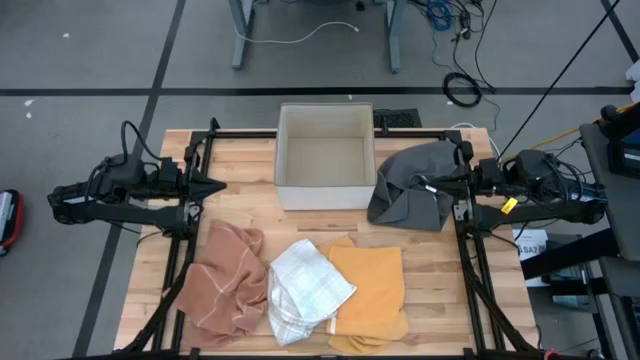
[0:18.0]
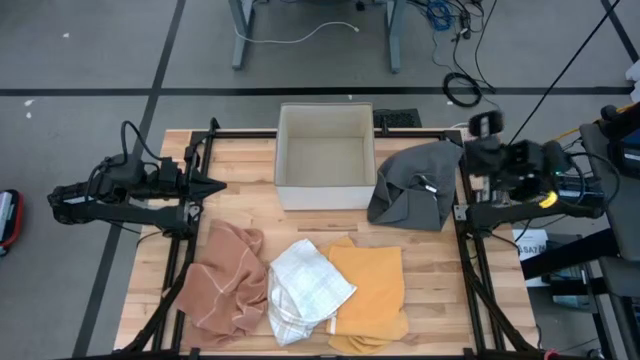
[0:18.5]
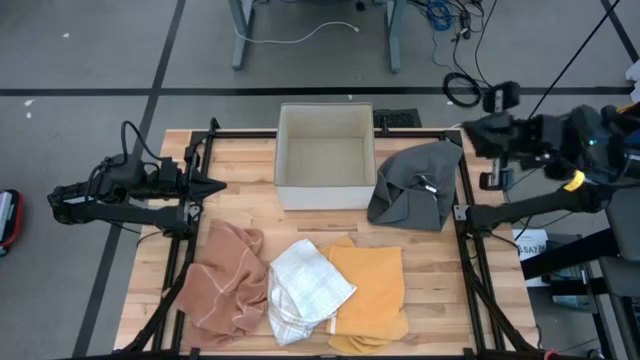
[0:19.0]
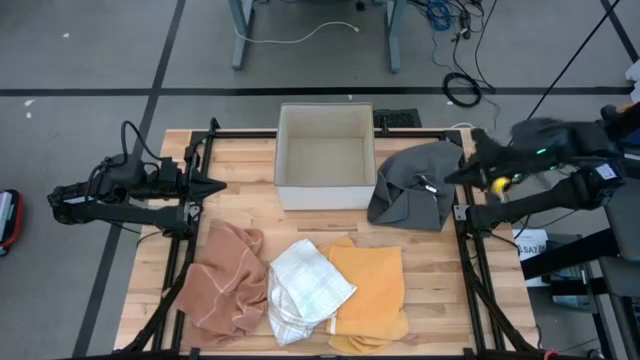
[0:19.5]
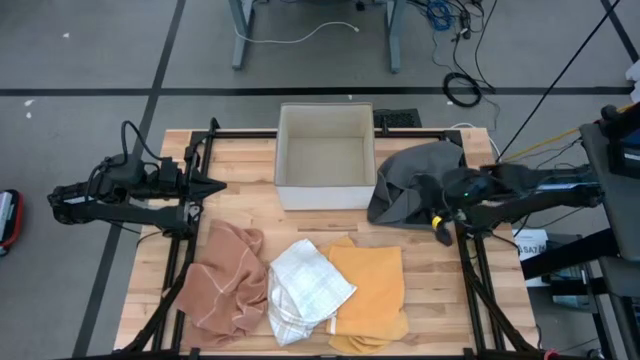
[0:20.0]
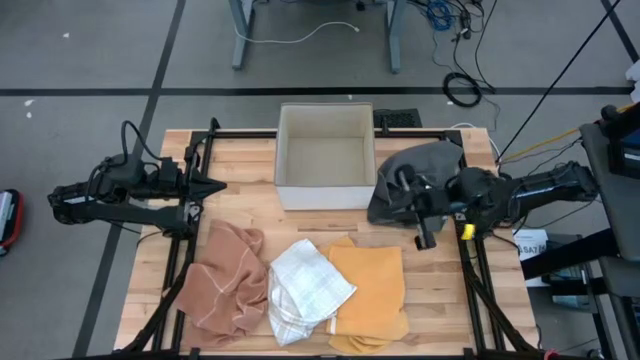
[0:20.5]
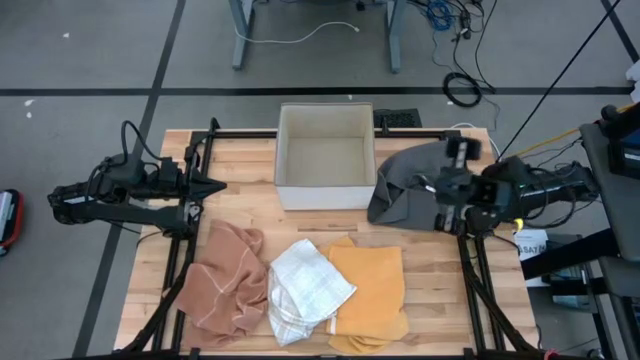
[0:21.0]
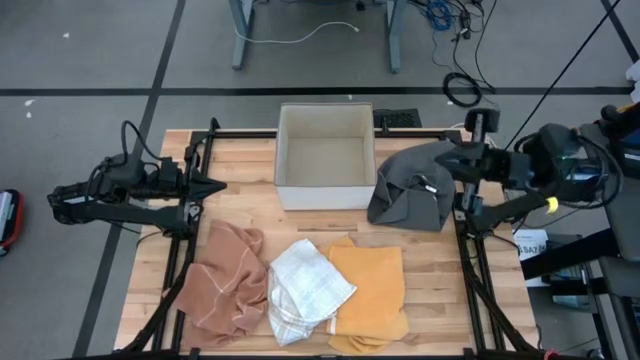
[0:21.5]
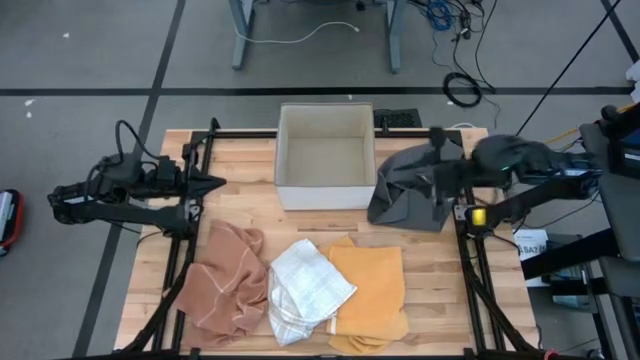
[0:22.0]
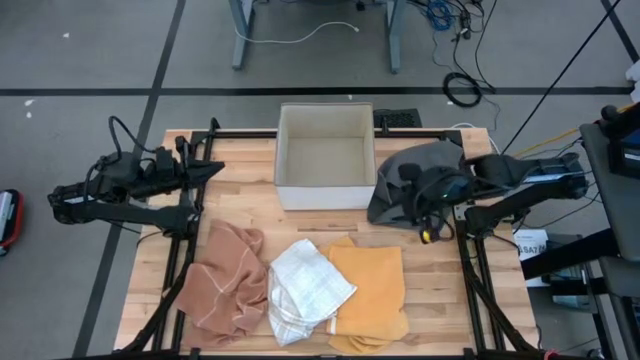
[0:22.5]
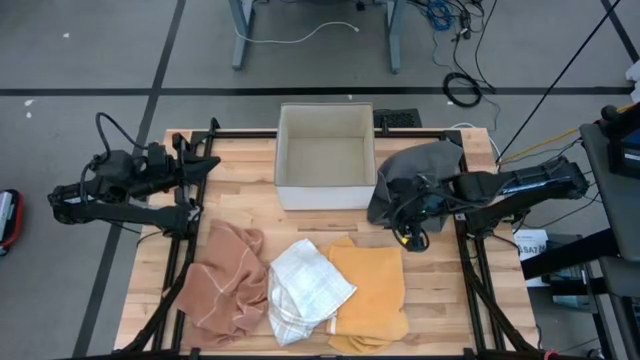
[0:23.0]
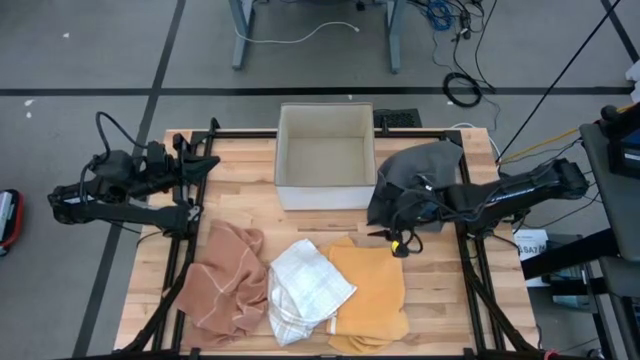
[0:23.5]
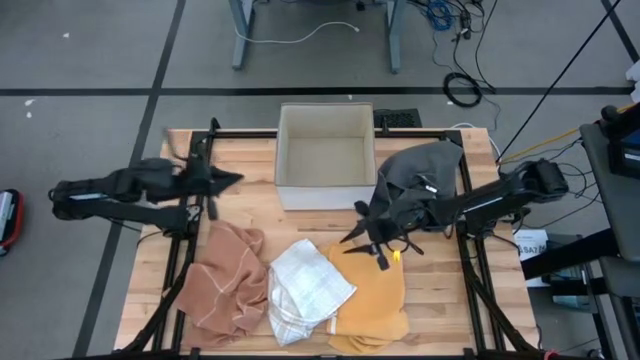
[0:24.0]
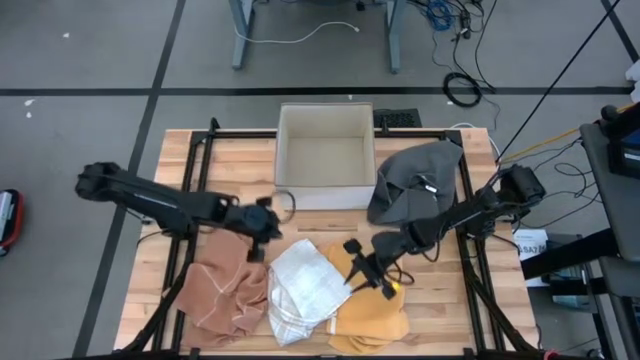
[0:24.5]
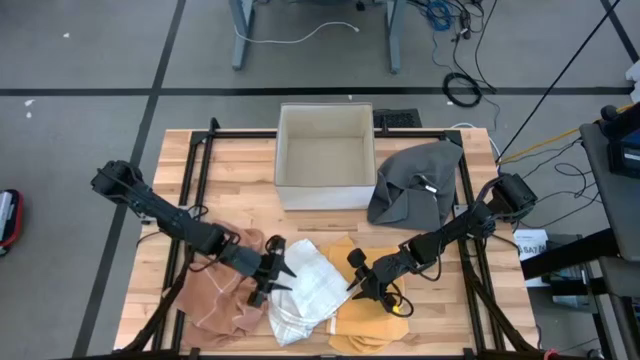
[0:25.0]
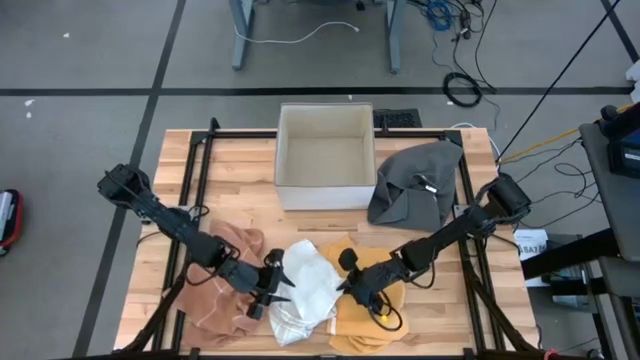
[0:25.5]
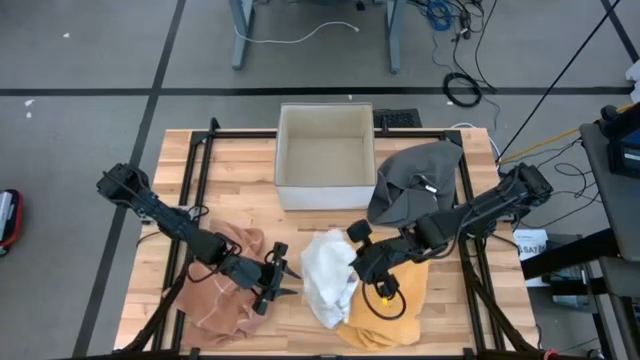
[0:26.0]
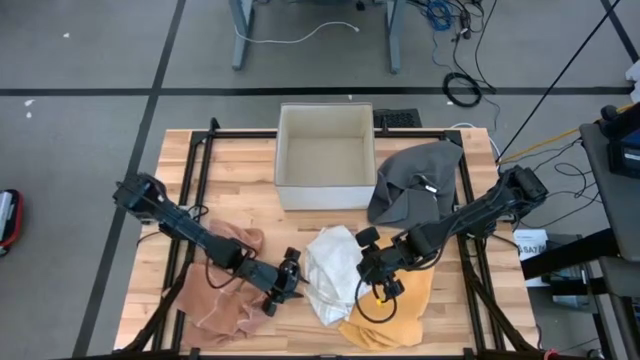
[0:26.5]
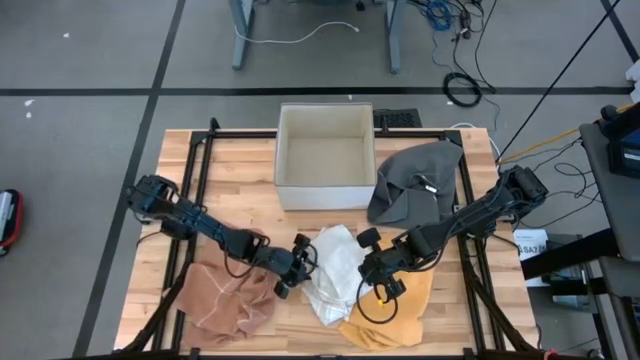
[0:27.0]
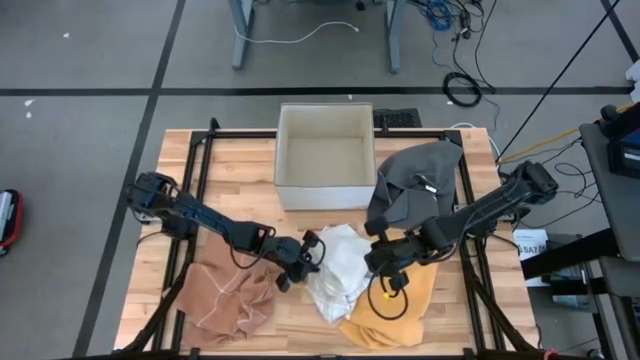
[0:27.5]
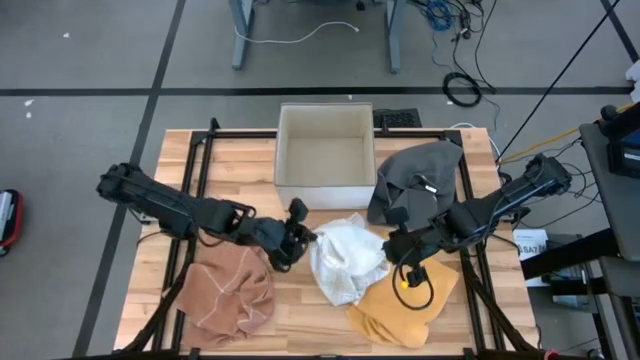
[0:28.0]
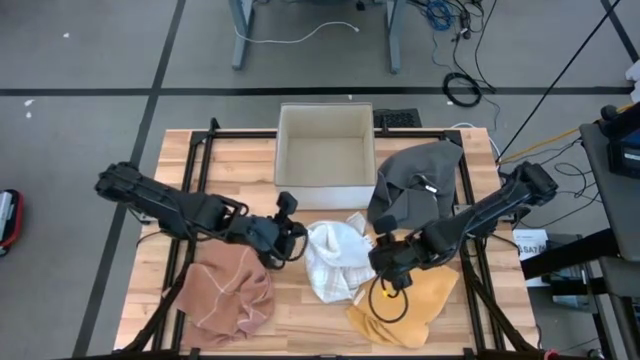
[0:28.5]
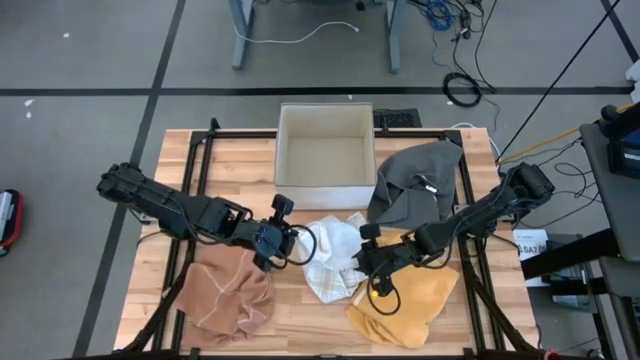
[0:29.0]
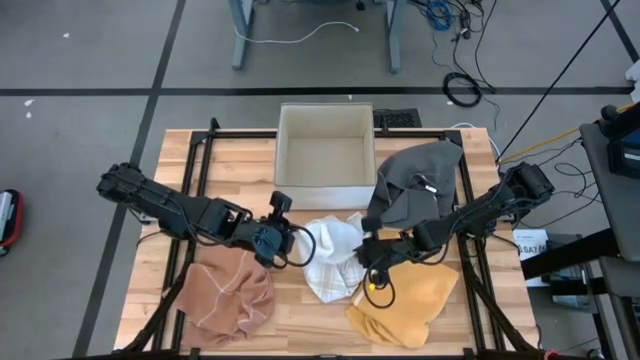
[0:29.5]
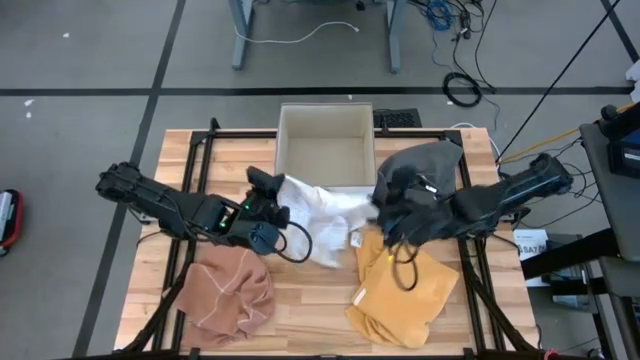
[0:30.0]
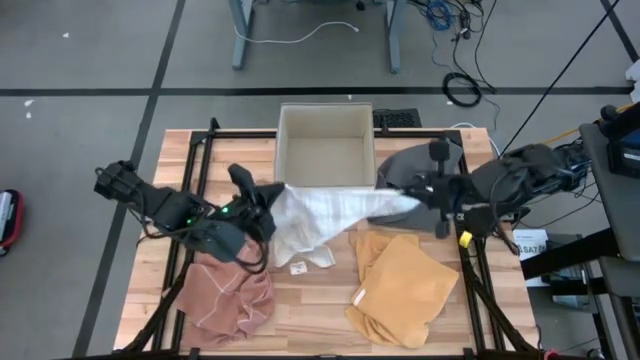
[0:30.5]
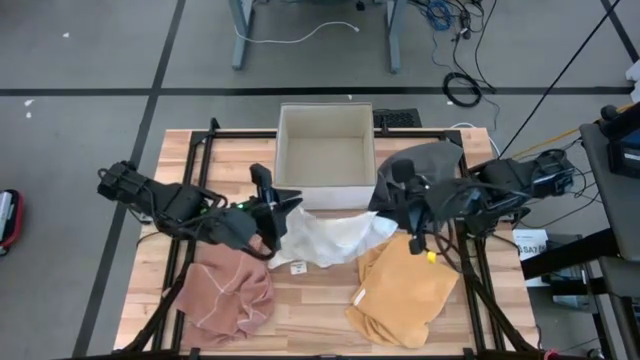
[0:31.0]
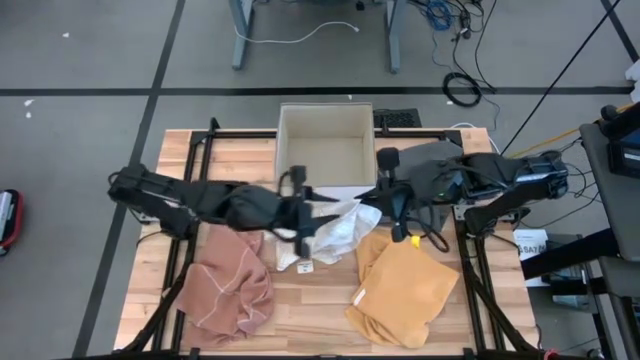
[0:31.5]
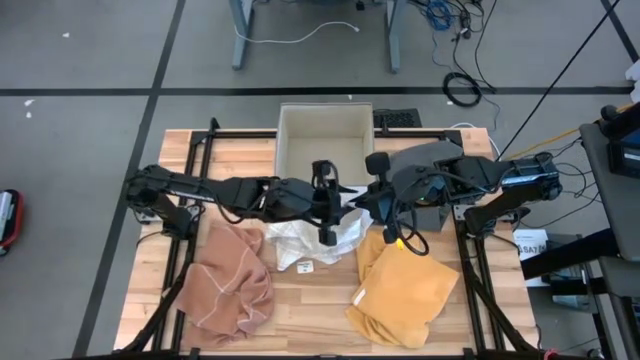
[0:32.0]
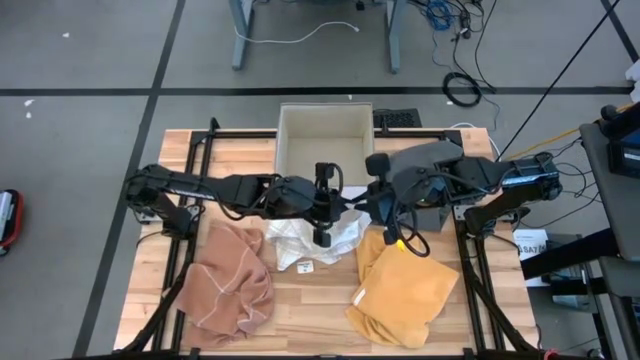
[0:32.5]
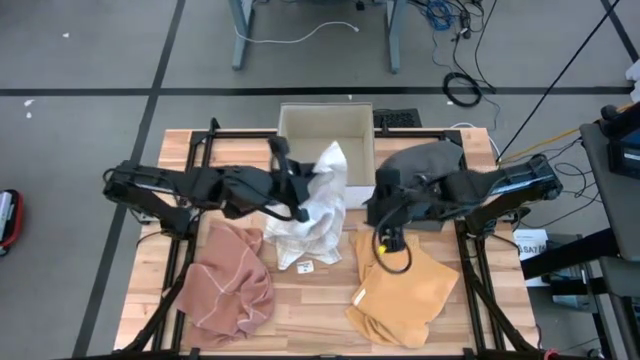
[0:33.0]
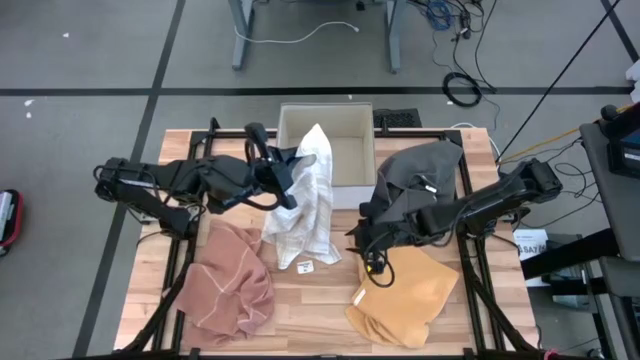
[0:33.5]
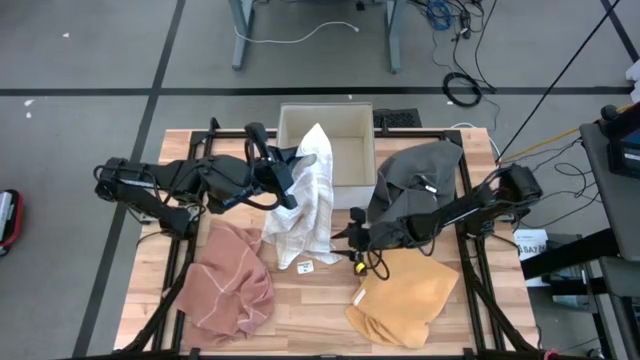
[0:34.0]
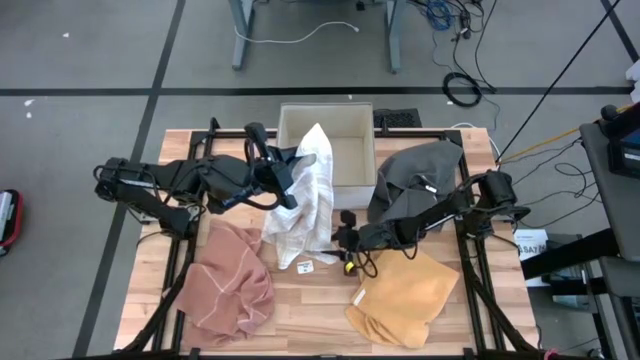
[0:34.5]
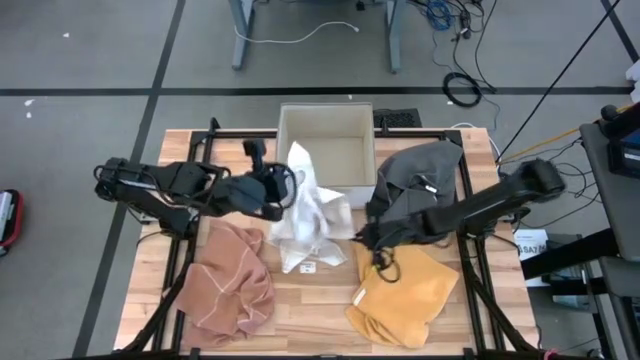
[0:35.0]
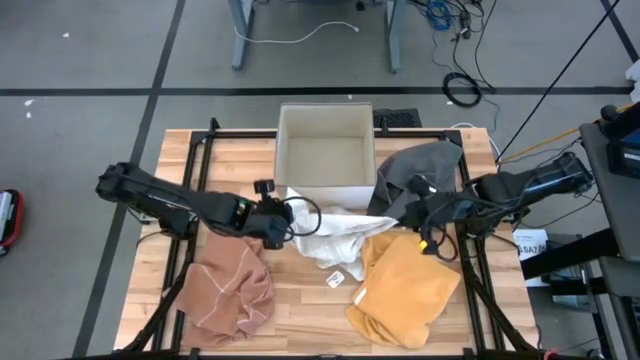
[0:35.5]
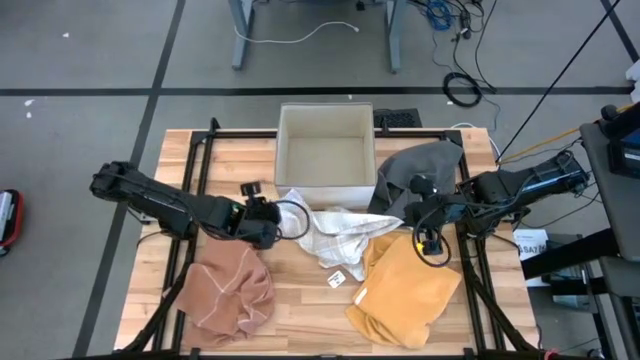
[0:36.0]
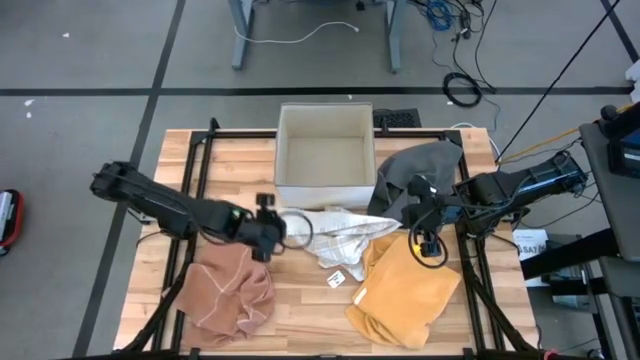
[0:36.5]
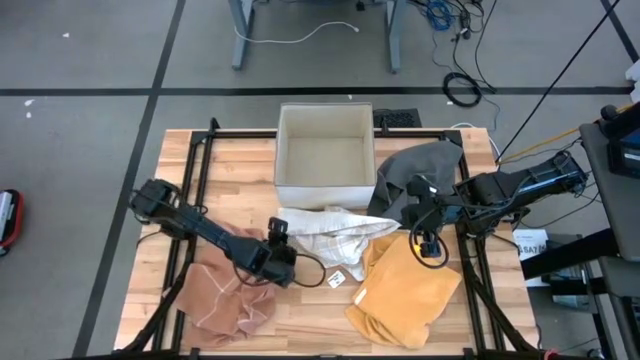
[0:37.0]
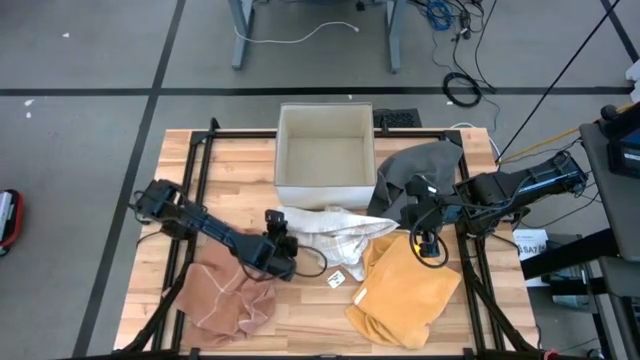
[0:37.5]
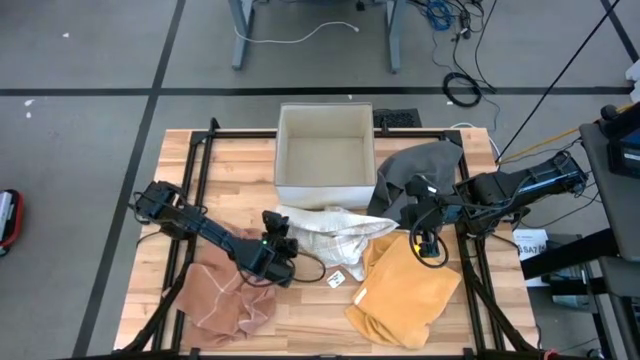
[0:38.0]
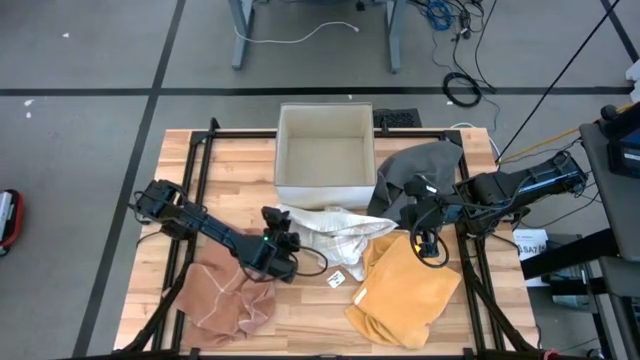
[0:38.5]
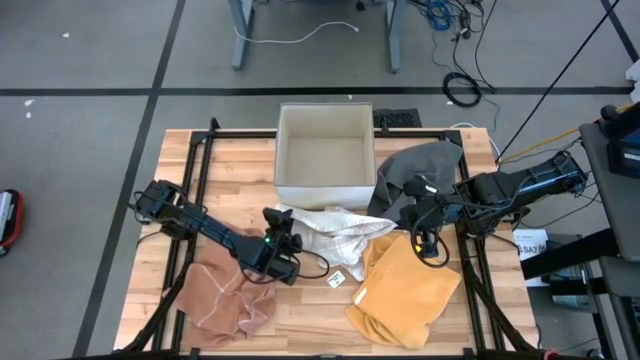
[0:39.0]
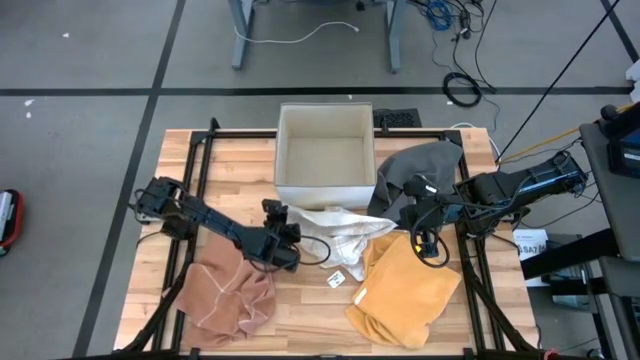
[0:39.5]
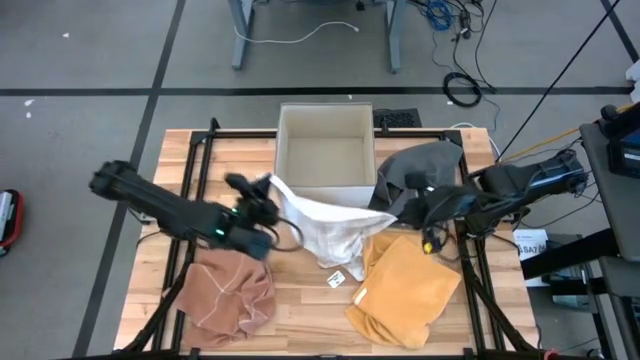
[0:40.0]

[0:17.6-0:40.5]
Task: Fold towel
Fold the white patterned towel
